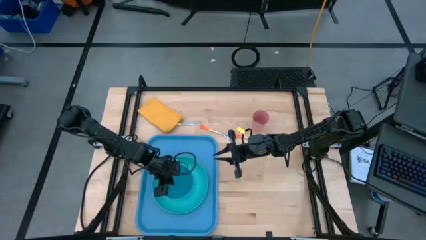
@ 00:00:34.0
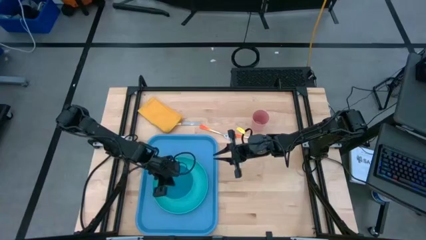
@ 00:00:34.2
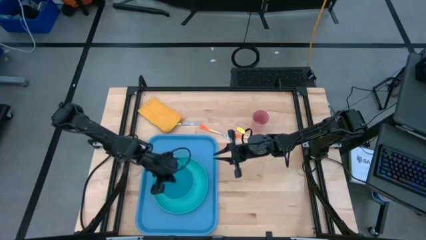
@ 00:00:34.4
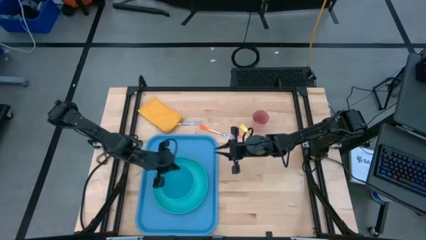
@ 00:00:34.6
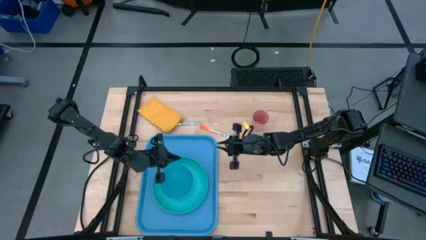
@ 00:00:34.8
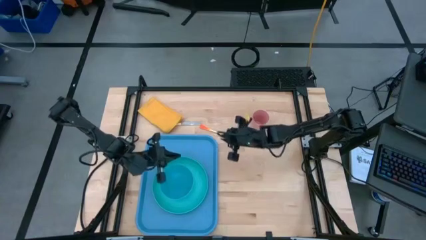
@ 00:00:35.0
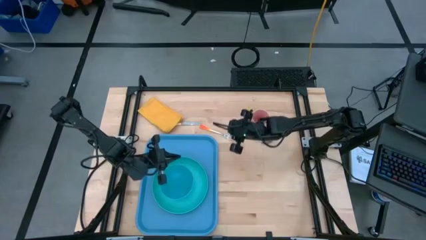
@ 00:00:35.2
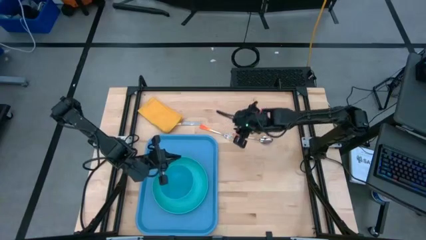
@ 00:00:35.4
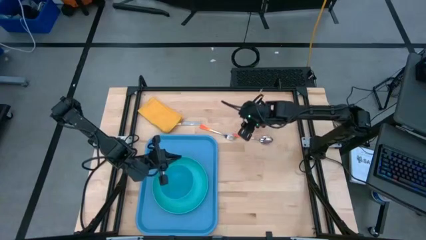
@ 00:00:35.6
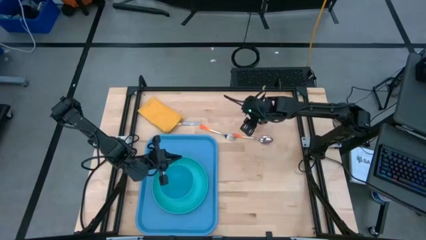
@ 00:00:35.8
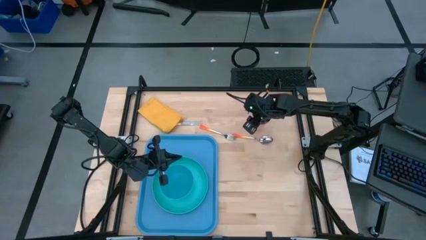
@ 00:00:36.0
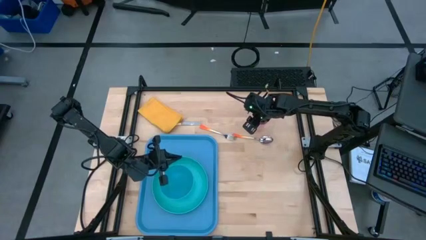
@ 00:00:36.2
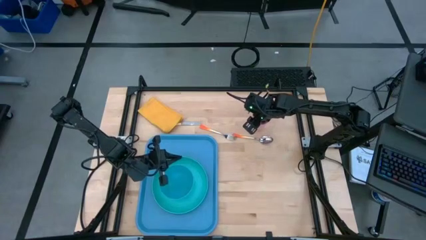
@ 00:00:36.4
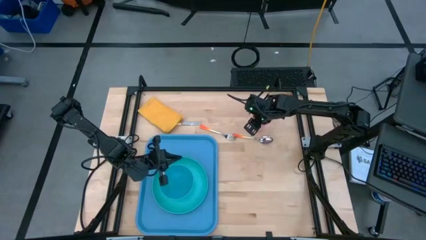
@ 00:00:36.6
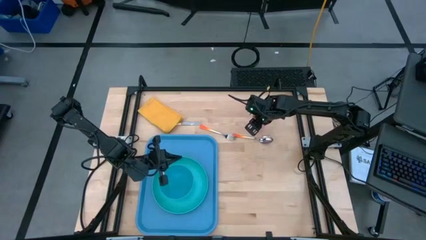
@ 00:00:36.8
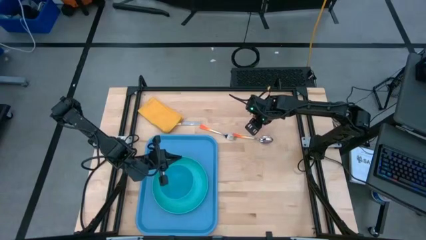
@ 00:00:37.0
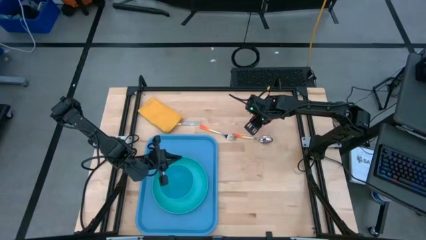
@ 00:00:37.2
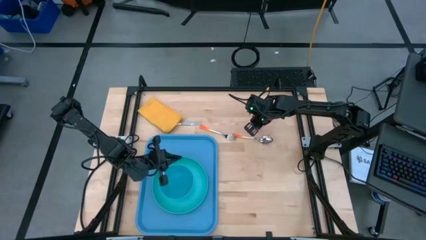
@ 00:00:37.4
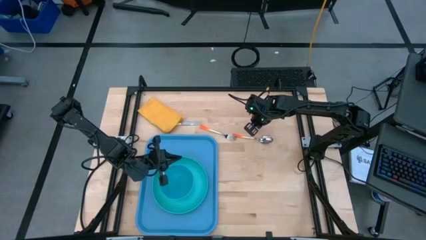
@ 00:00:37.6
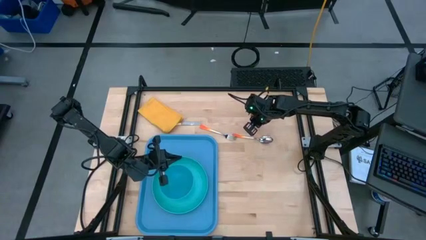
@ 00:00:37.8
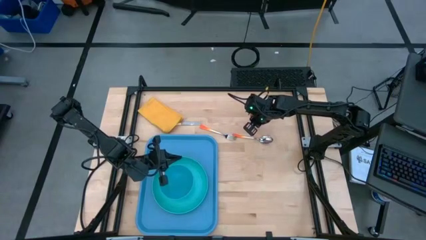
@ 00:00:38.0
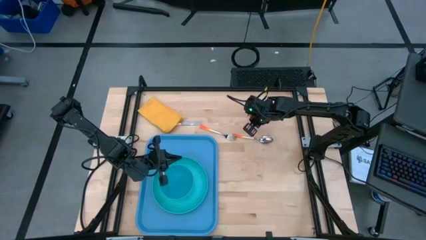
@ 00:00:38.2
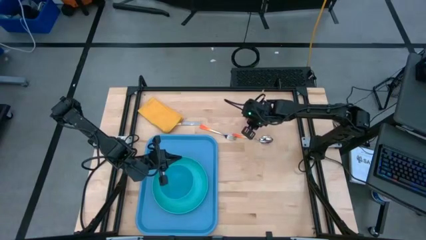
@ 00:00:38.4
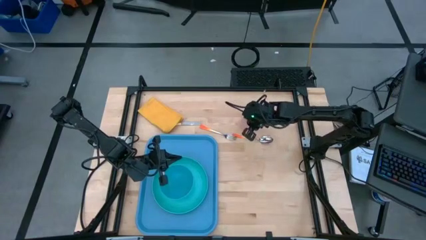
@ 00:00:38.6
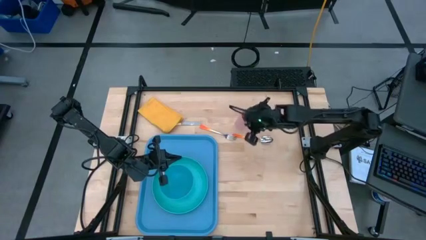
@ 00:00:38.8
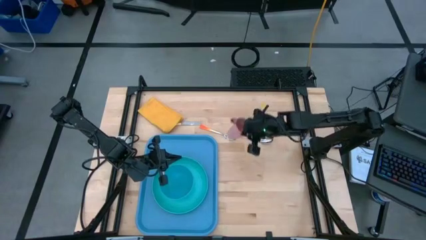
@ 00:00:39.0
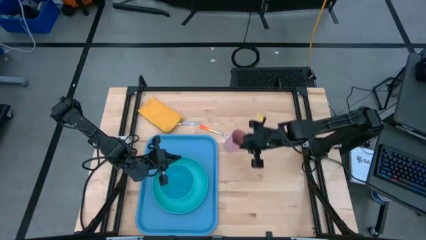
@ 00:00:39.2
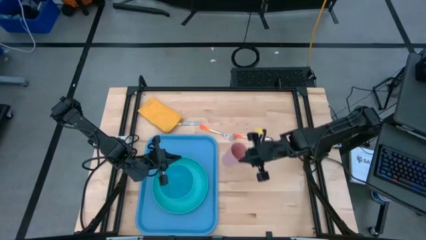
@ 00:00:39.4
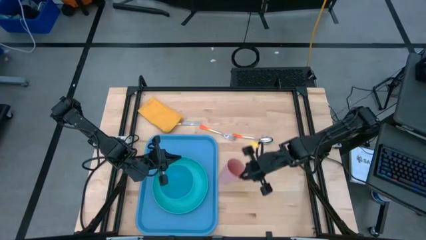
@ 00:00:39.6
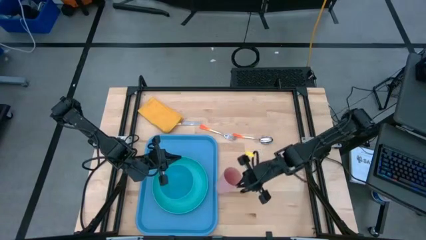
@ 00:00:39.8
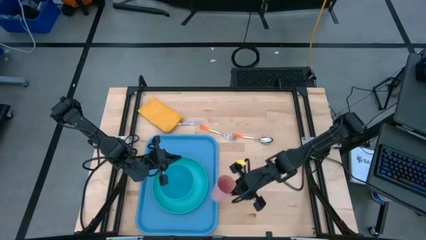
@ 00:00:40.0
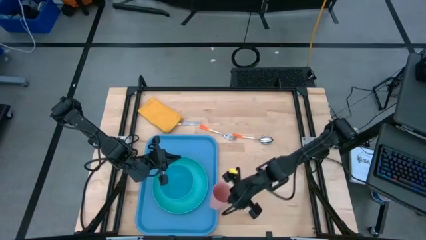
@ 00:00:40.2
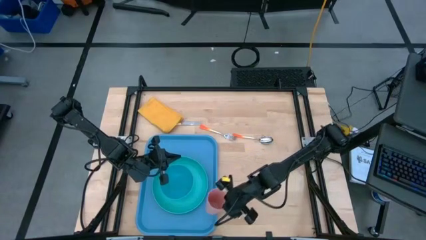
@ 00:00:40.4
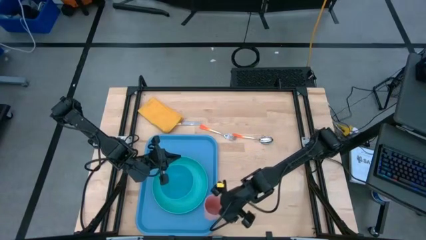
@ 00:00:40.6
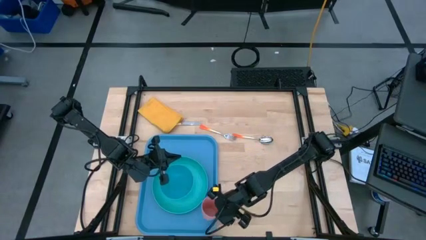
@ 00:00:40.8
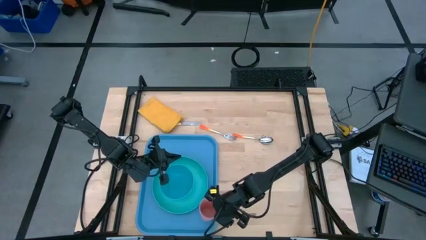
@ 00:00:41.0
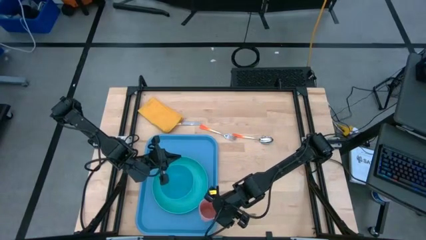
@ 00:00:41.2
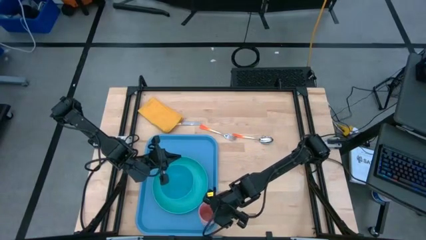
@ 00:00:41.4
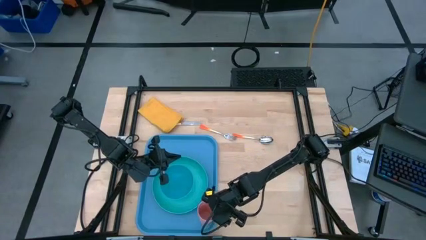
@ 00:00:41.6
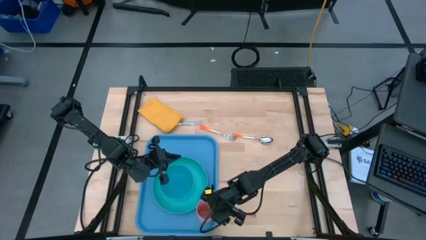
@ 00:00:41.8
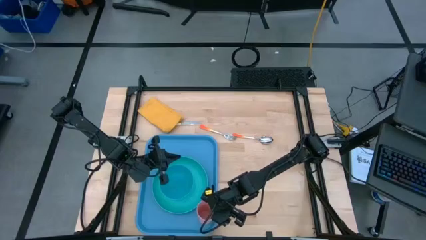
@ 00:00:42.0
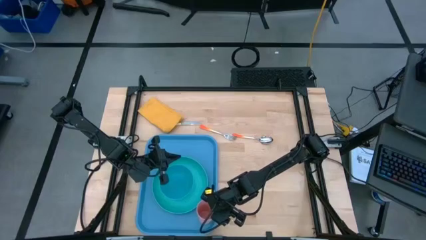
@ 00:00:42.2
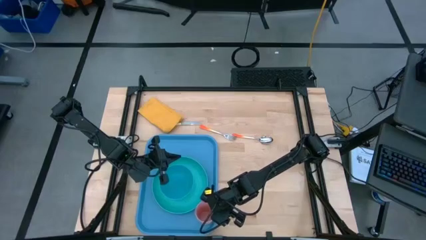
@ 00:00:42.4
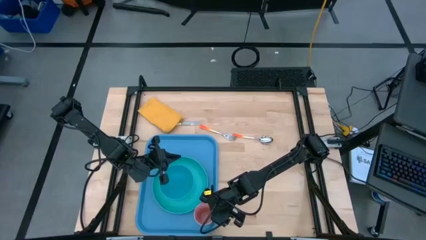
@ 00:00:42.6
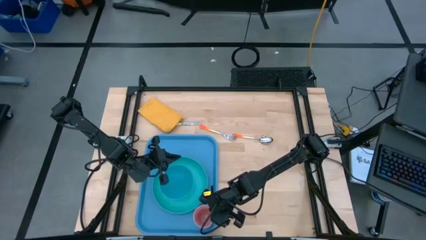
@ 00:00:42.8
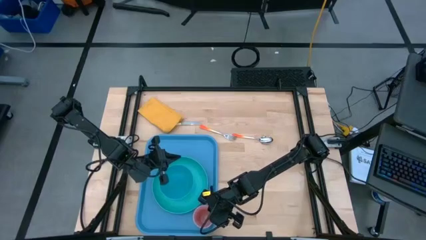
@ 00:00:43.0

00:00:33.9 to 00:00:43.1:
Task: Set up tray
Put the pink cup to the bottom right of the green plate on the blue serving tray
